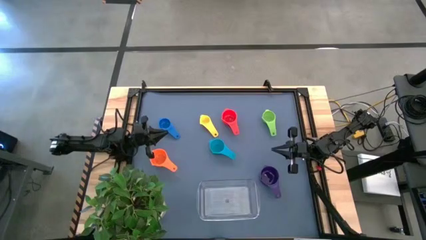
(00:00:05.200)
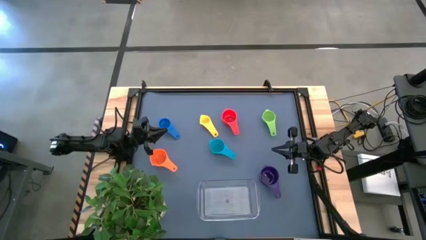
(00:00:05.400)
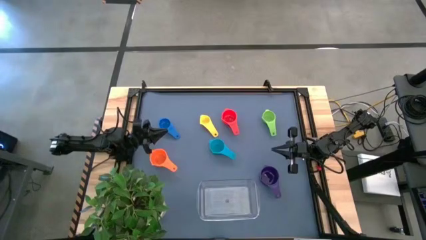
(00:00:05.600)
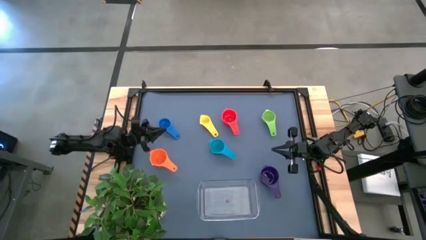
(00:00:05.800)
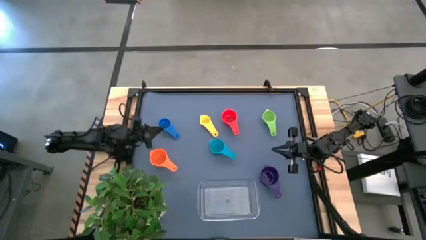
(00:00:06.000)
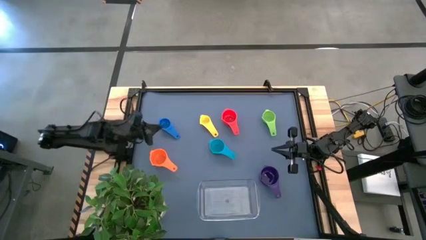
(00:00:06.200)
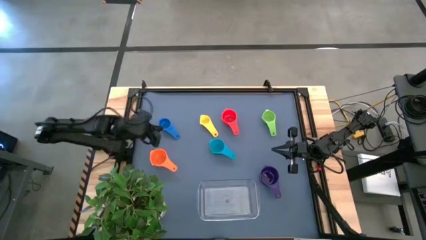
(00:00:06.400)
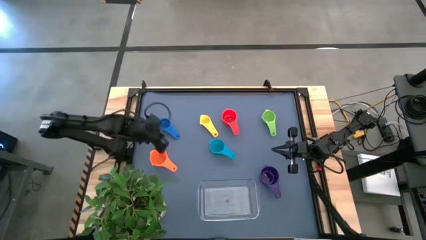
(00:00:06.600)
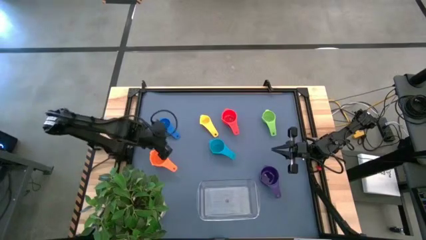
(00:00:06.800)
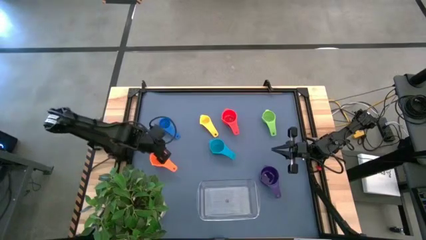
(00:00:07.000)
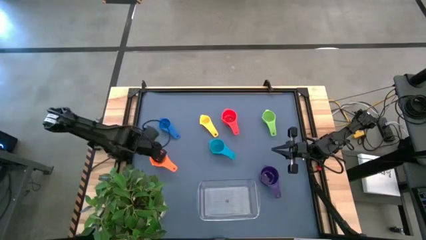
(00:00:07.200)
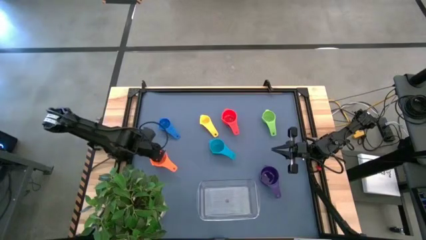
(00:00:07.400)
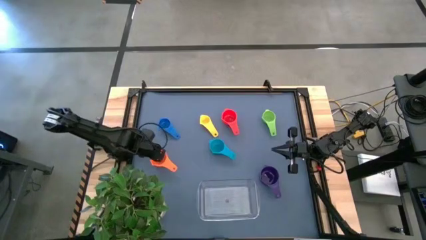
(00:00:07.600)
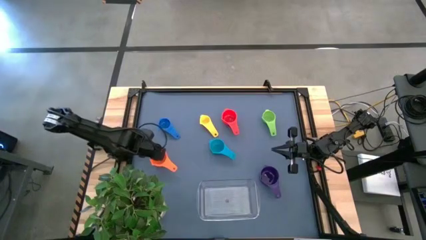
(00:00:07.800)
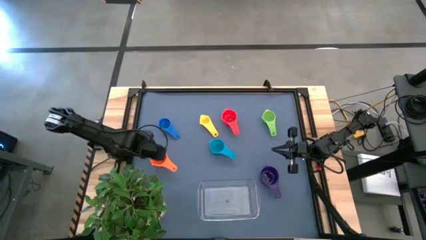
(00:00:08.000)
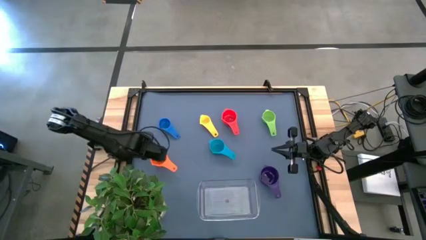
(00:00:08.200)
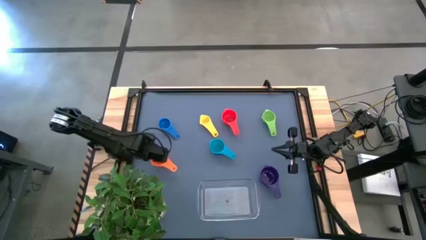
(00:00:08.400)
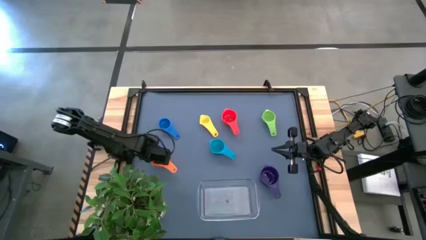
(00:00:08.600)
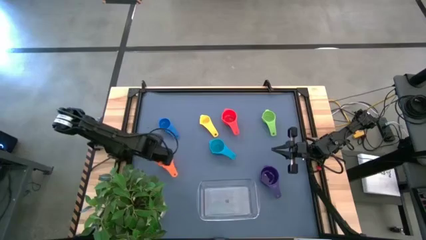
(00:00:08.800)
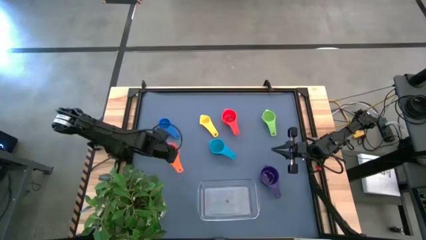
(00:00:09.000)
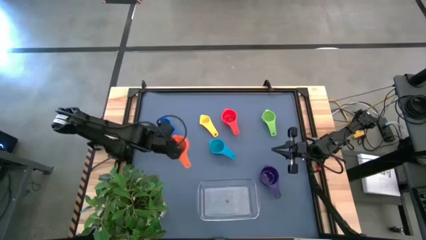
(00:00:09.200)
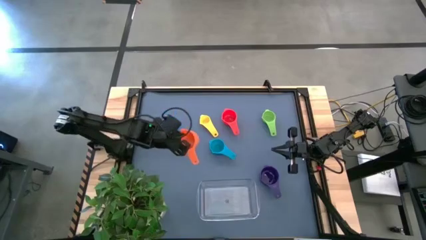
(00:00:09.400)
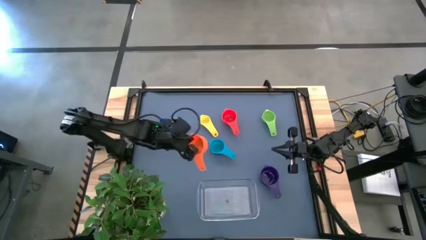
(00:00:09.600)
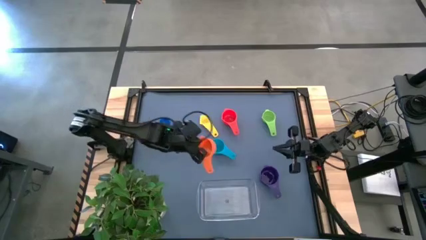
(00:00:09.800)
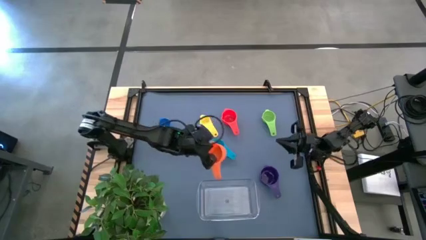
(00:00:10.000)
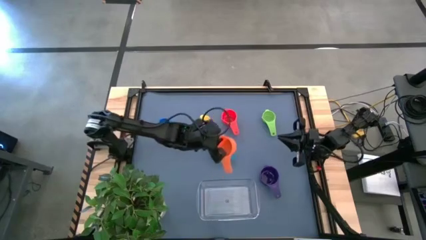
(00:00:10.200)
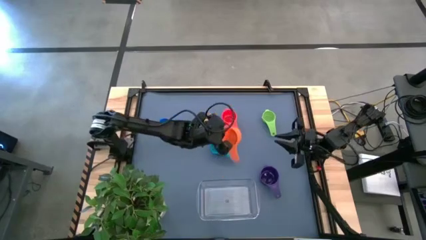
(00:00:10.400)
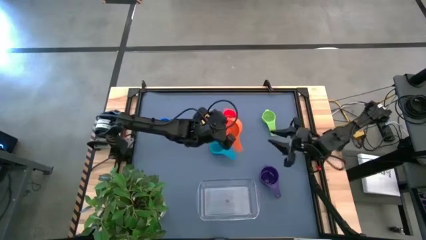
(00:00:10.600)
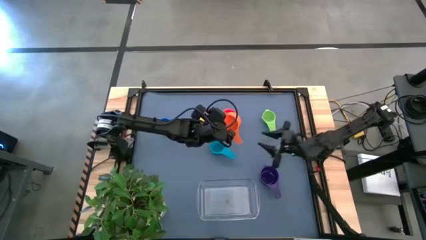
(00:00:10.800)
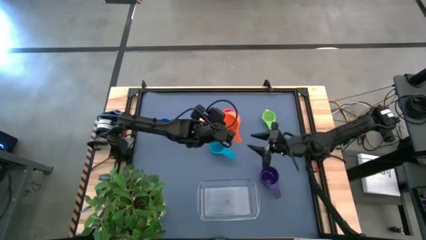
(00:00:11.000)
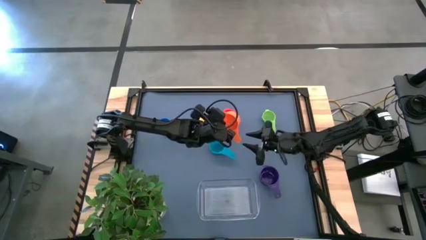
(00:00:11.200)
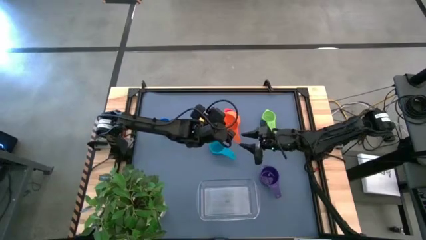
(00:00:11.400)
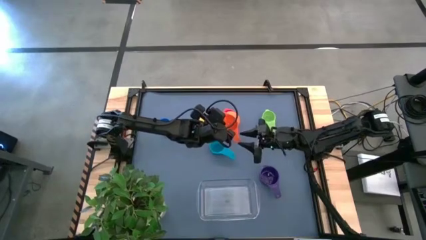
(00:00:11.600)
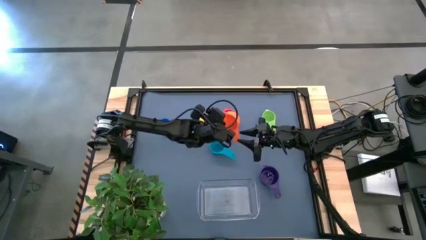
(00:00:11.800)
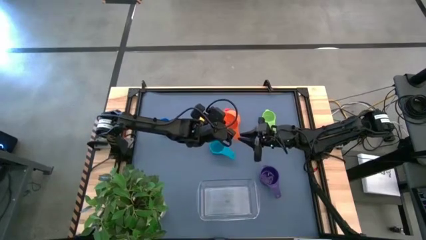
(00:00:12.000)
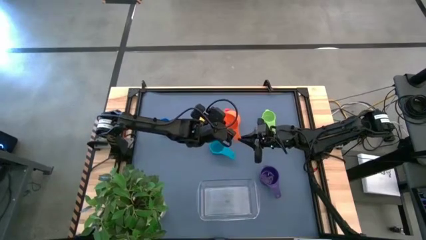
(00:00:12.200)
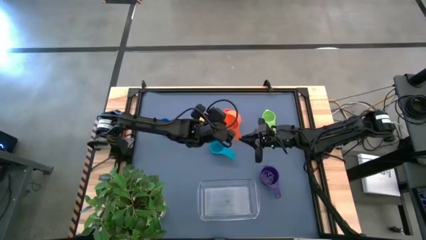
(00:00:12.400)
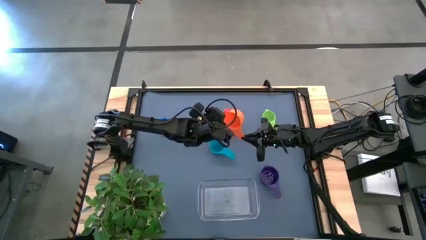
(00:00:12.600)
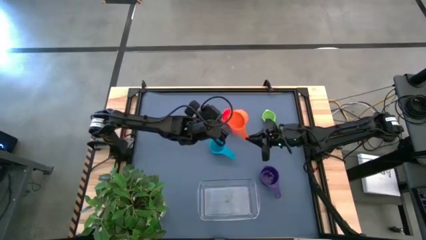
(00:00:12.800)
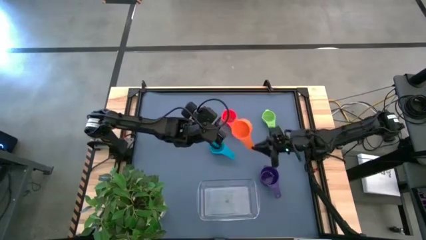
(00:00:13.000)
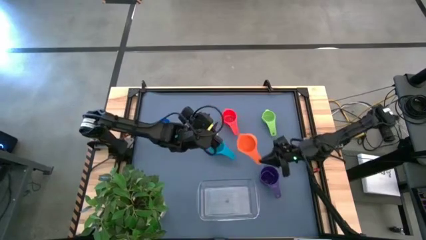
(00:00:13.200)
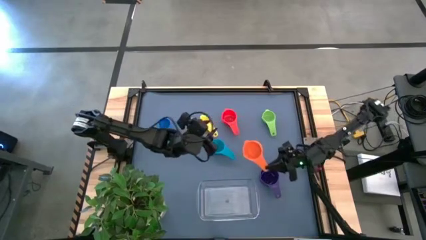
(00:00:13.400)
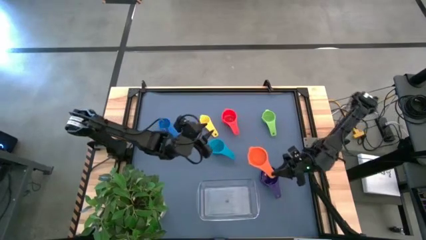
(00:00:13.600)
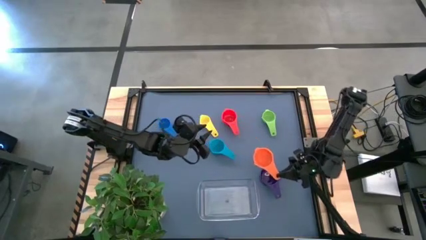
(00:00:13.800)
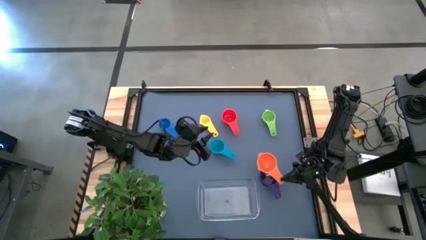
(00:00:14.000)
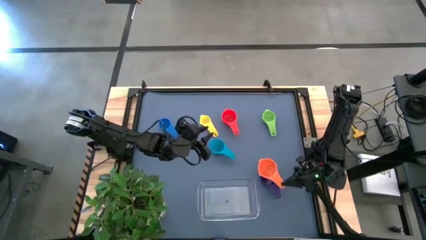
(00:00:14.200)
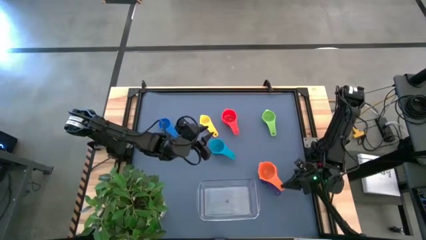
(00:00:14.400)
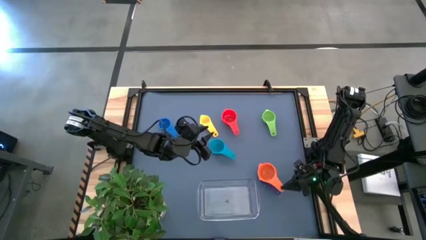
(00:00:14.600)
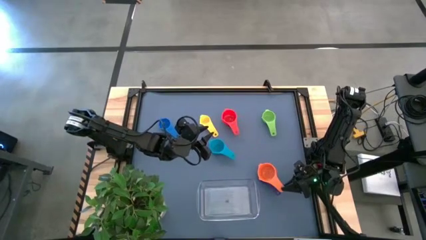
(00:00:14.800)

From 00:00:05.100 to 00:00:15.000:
Task: Nest measuring cups in basket
Stack the orange measuring cup on top of the purple measuring cup

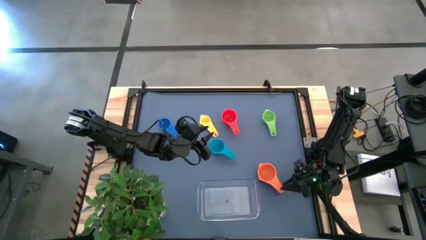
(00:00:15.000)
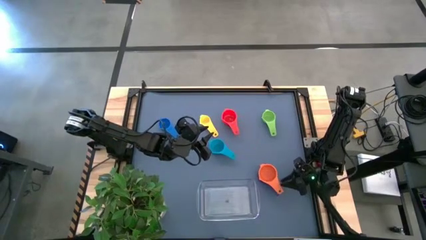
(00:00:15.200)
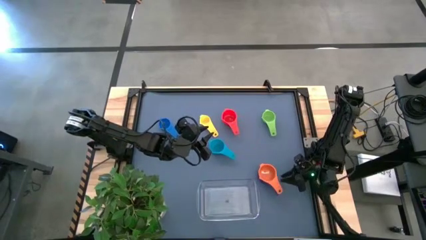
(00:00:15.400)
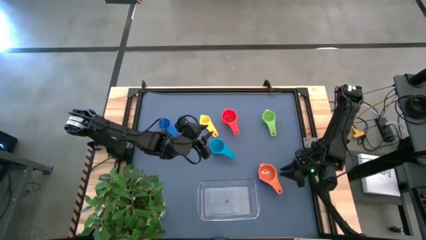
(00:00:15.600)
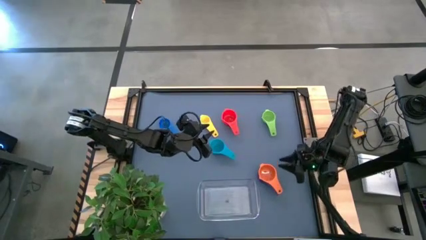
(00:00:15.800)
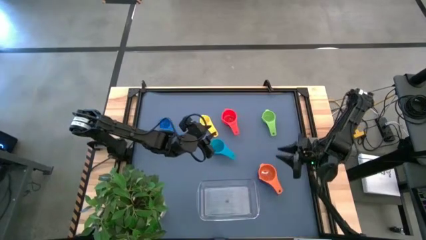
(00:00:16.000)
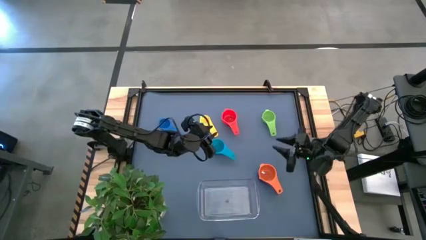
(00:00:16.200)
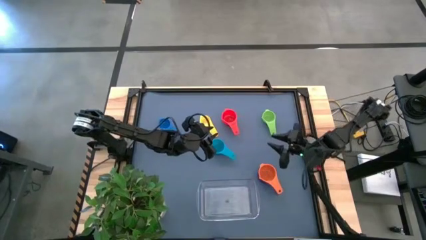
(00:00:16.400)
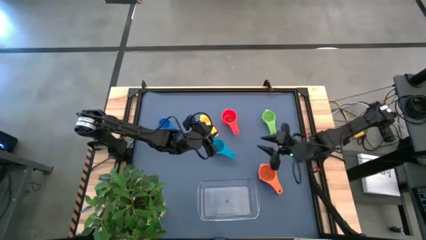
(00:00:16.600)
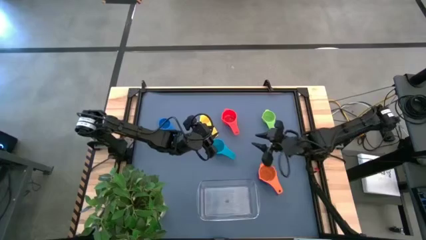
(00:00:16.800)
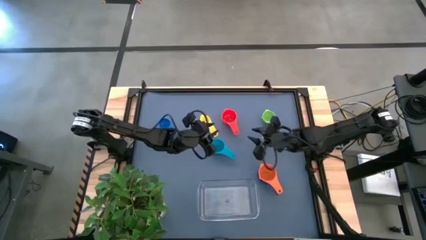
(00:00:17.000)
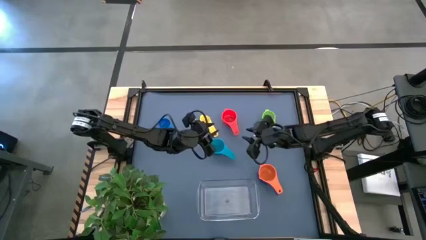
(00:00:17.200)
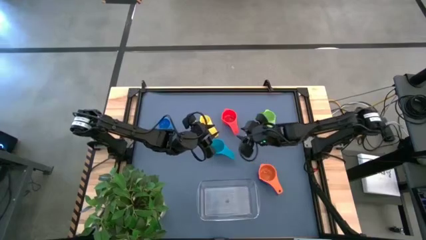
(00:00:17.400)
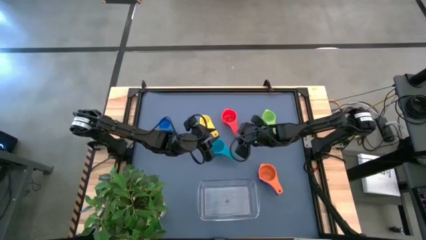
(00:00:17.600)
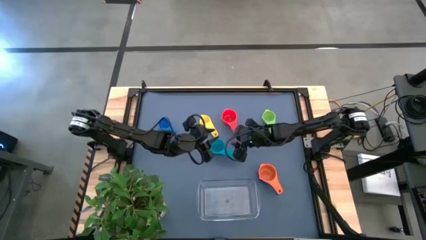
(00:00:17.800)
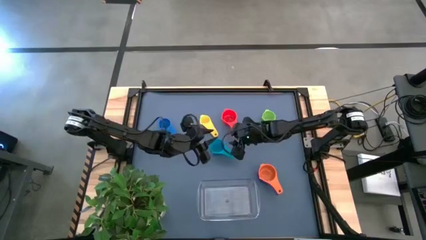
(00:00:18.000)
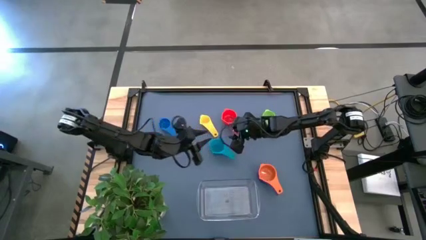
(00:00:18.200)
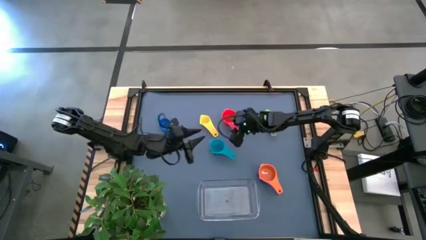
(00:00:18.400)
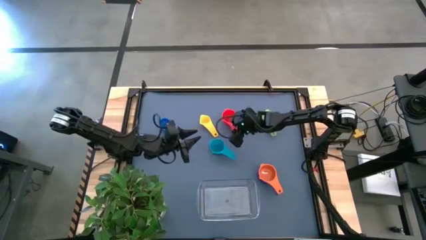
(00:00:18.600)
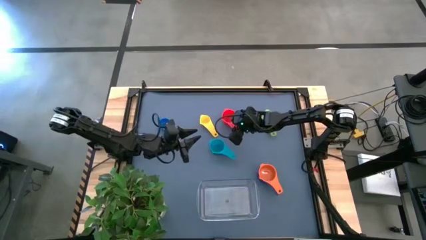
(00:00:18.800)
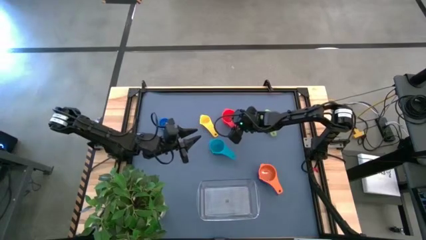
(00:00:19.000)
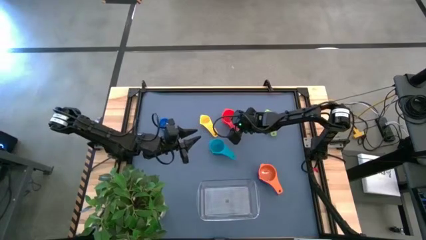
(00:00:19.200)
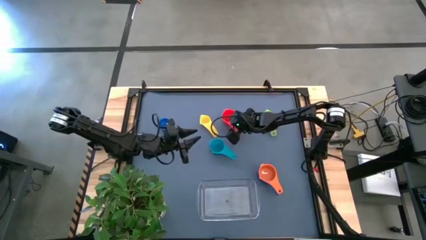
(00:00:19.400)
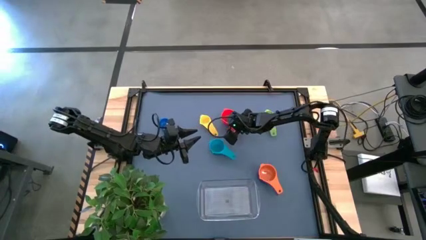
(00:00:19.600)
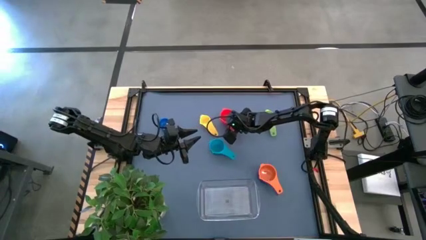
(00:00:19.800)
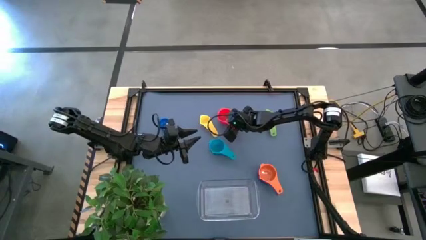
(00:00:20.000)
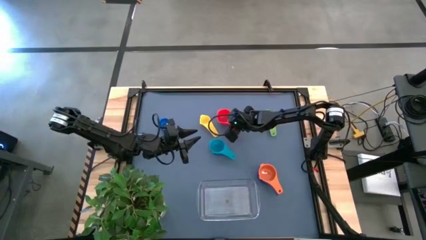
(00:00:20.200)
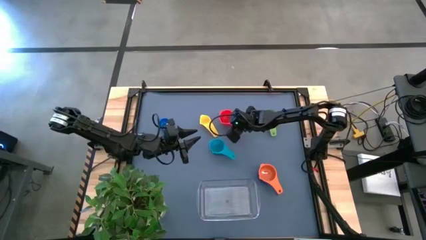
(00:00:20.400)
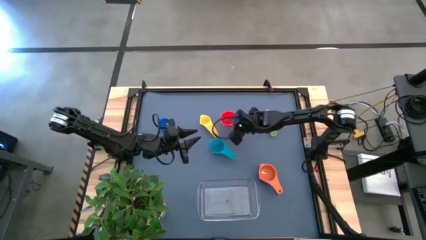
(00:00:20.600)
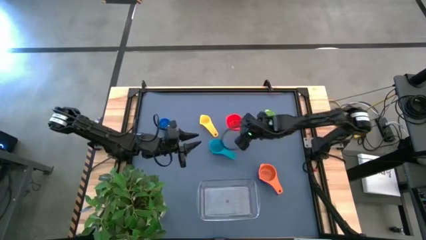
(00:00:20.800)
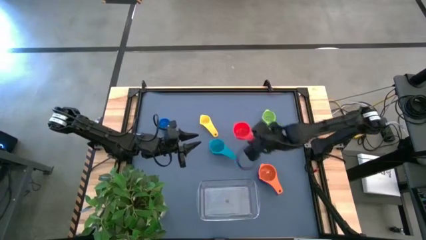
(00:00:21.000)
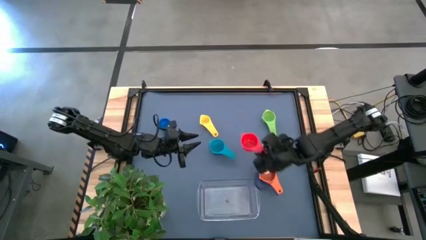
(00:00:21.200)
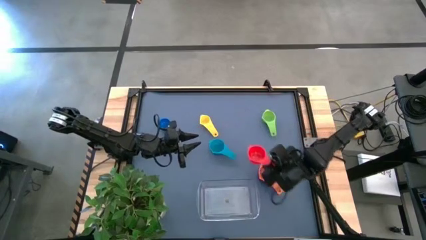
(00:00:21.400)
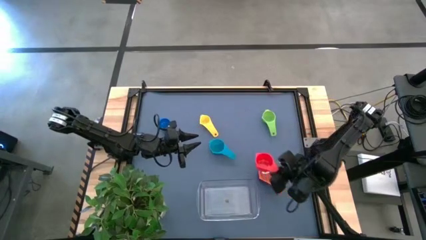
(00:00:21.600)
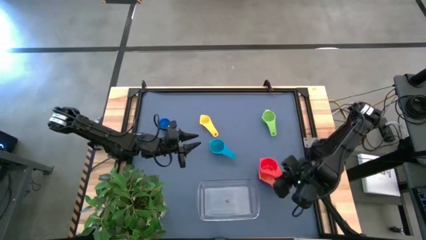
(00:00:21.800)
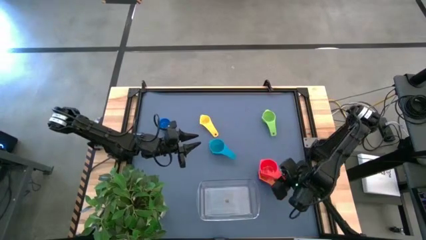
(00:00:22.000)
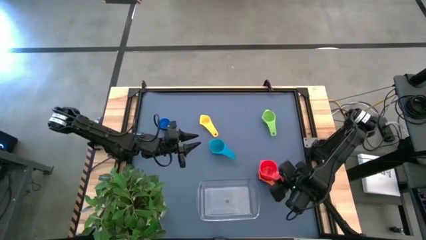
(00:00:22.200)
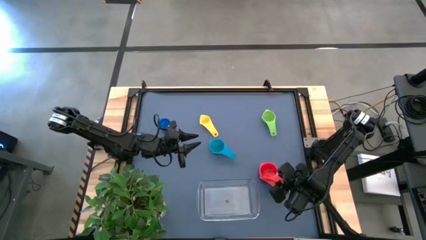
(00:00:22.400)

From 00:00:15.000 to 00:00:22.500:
Stack the red measuring cup on top of the orange measuring cup
